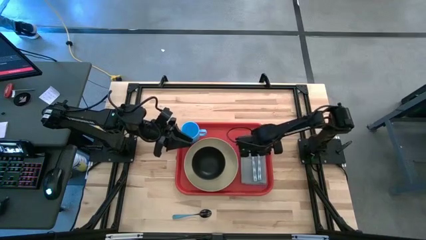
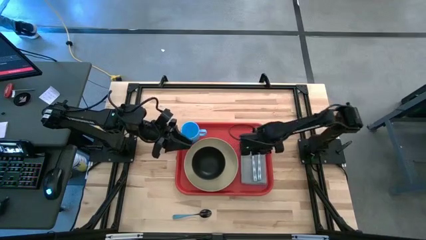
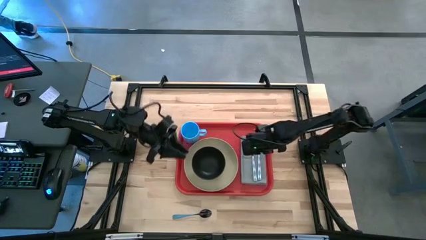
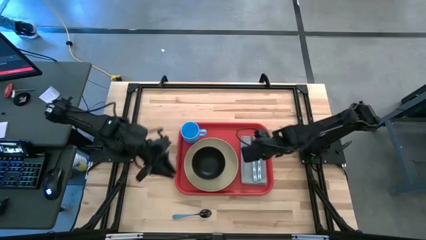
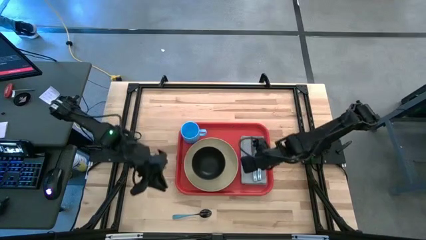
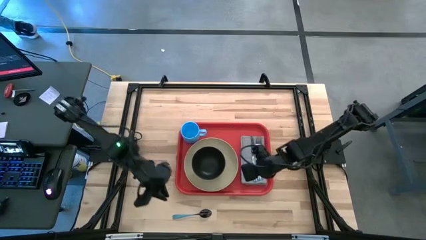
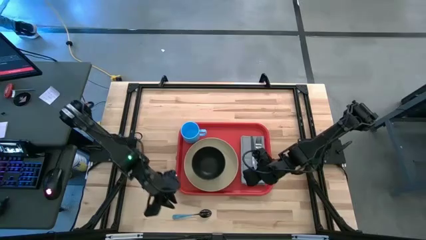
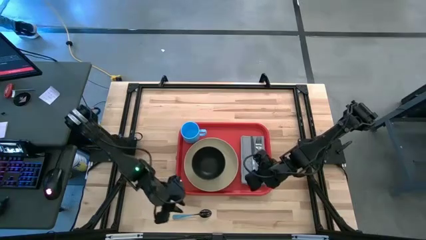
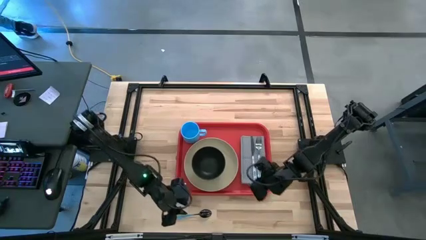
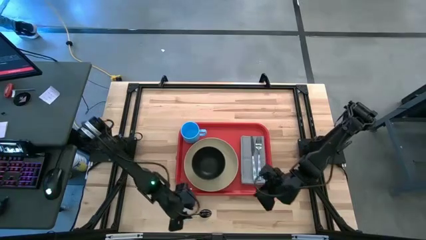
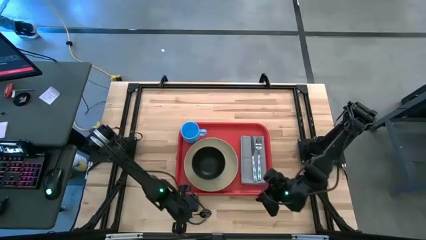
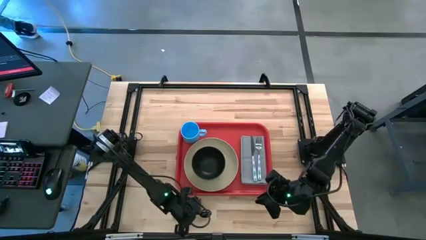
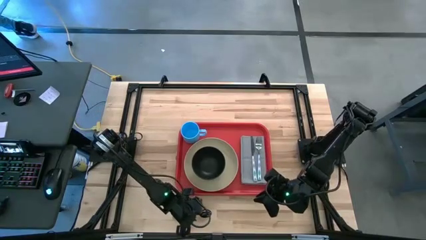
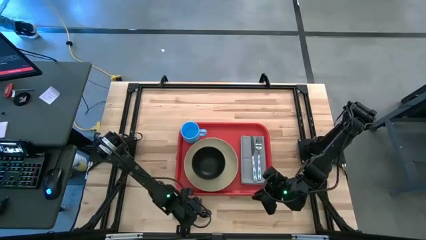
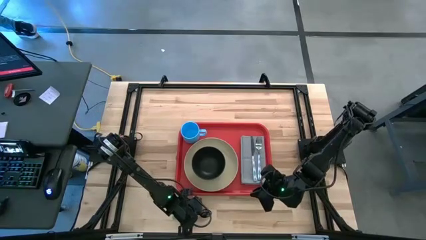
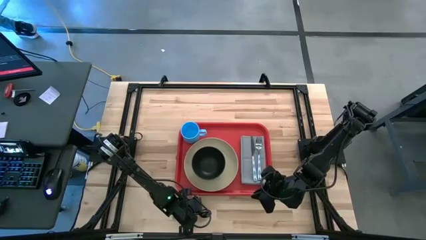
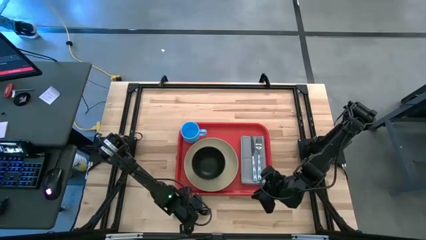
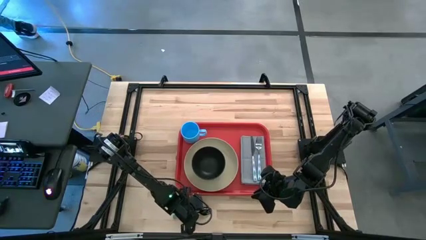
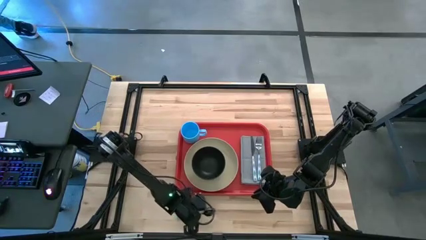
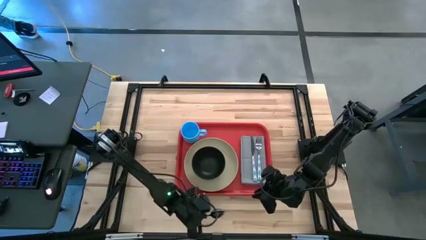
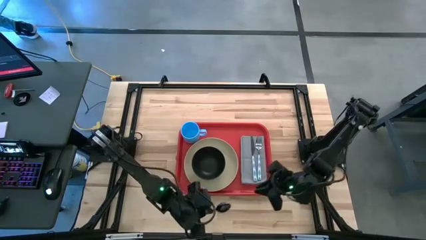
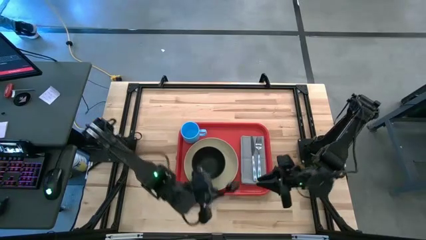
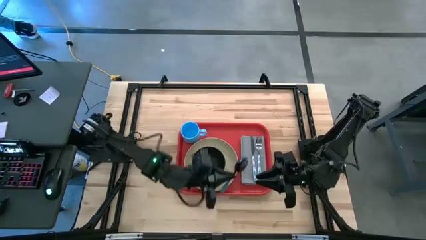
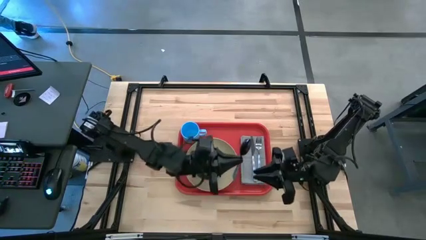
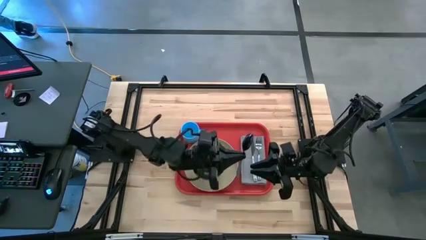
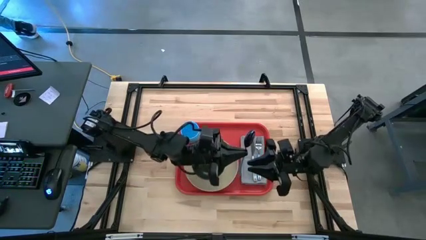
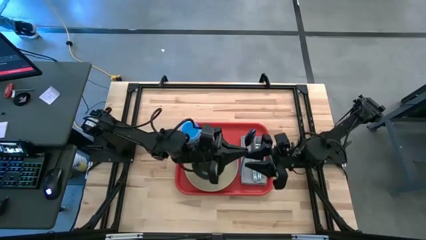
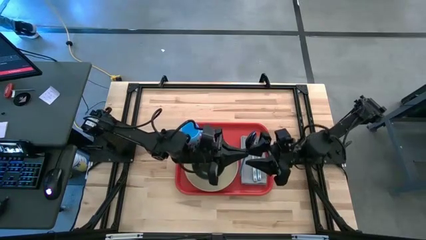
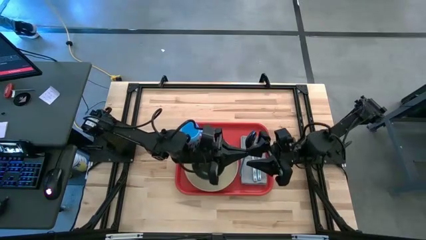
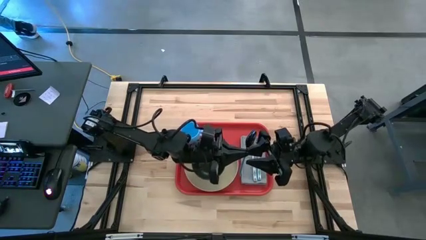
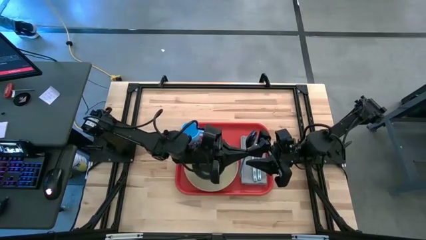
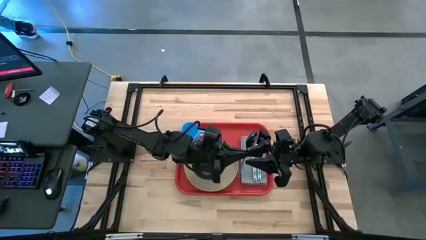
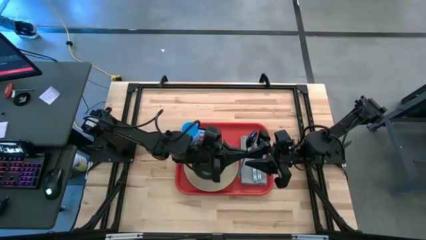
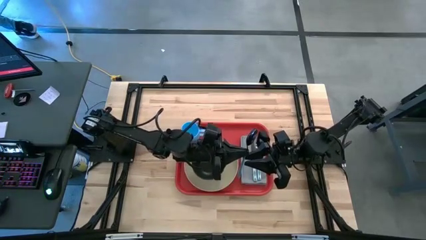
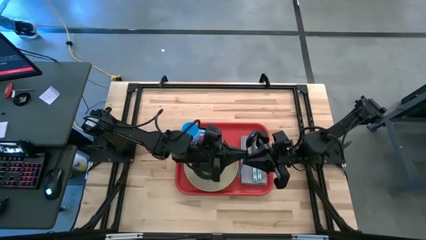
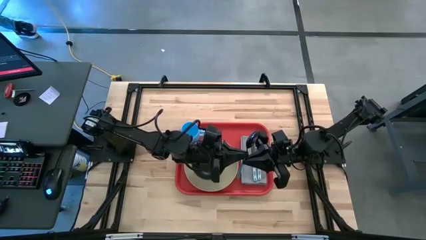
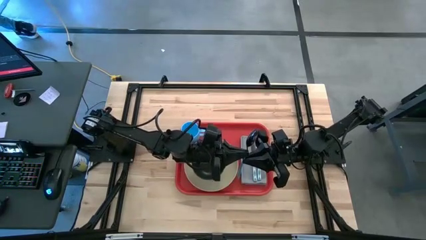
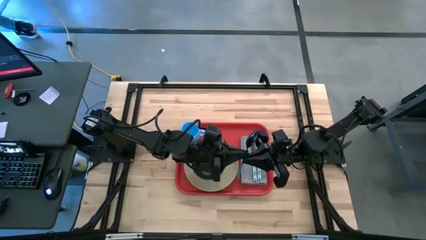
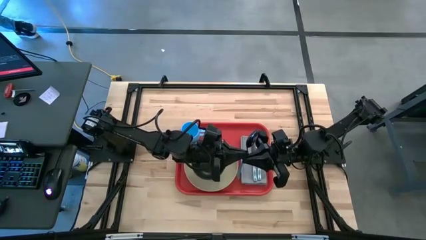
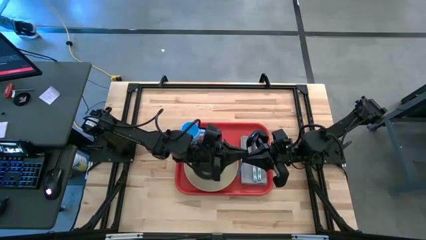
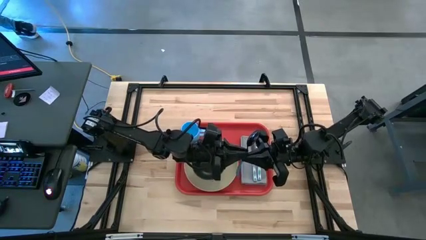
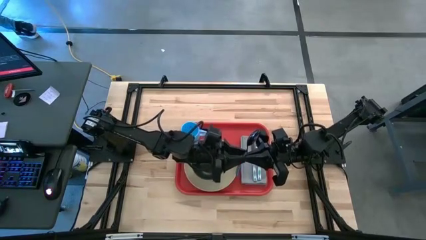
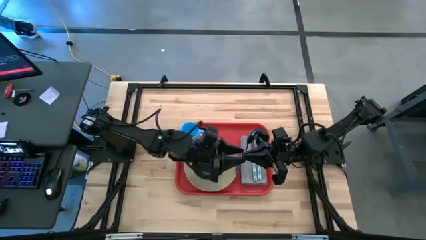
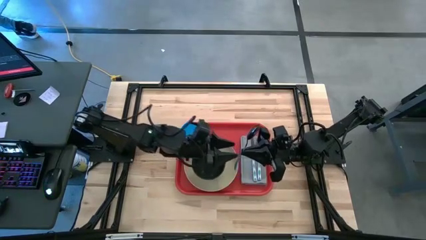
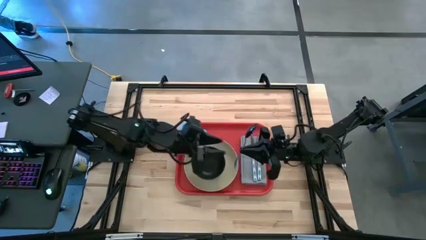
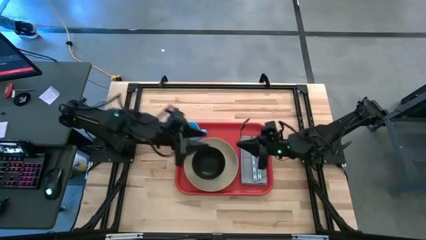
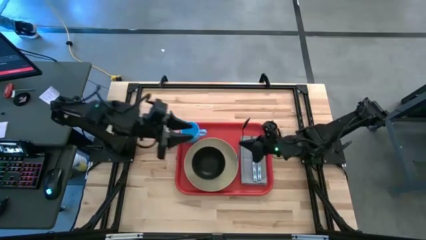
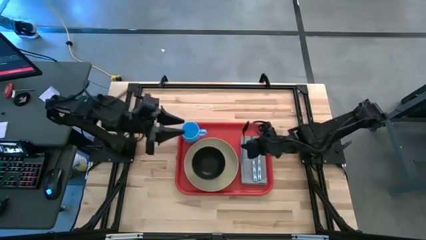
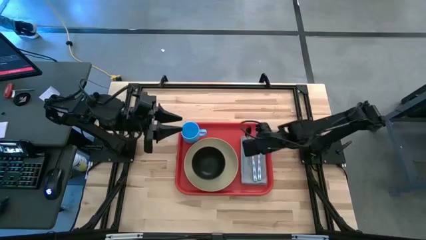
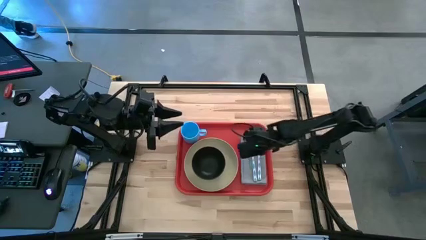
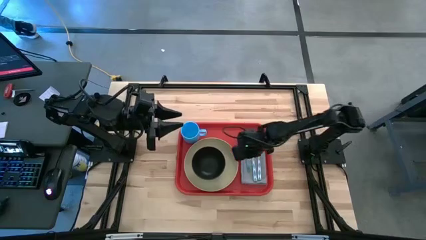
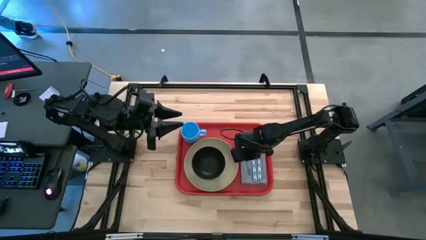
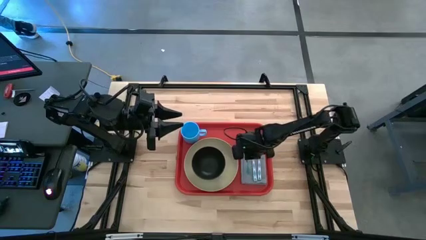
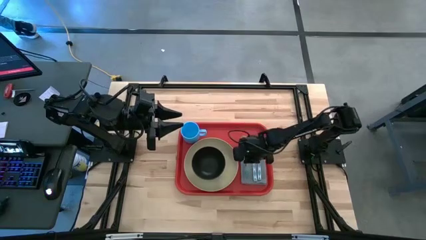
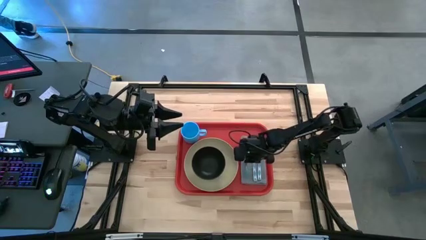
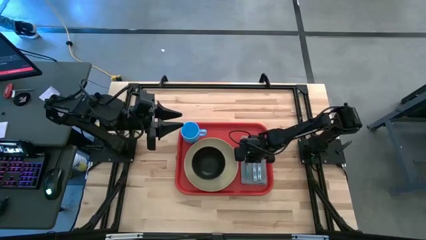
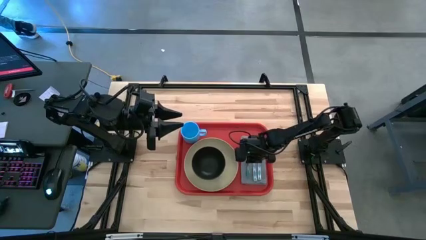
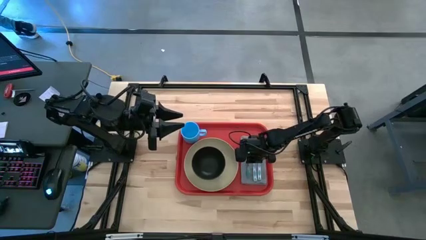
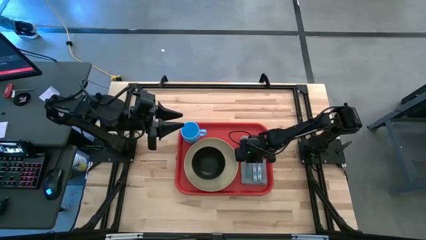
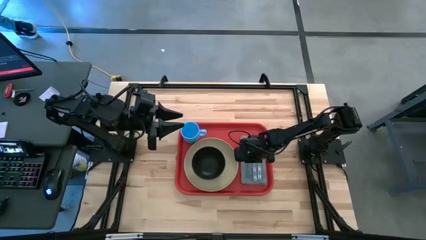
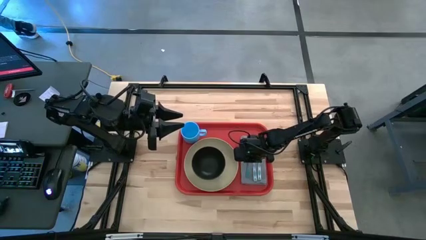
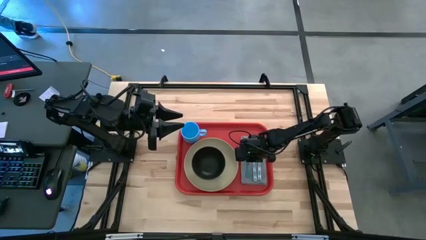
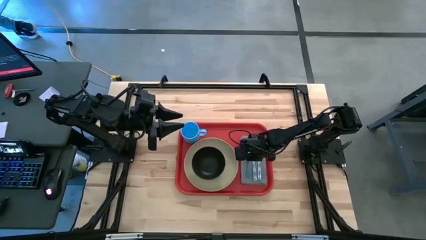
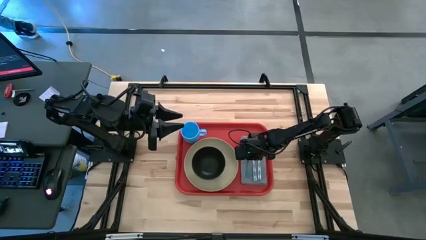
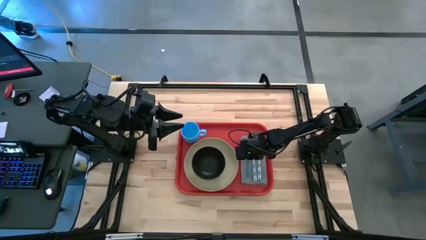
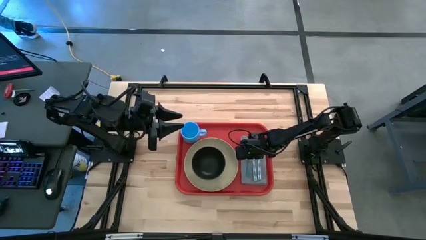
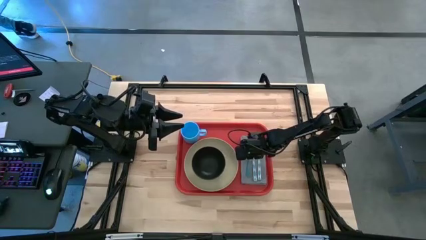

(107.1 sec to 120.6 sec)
Task: Set up tray
Put the blue spoon on the gray napkin to the left of the blue knife
